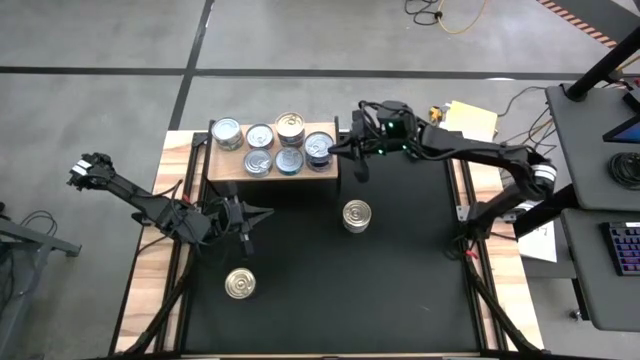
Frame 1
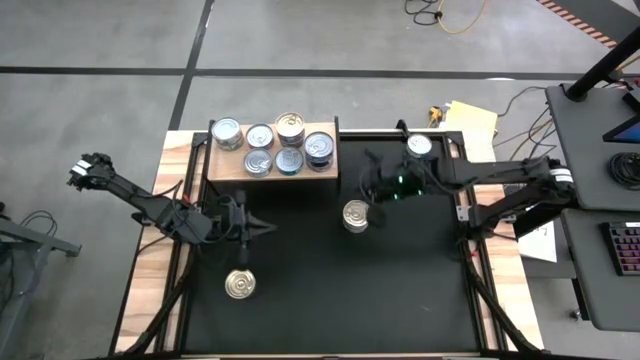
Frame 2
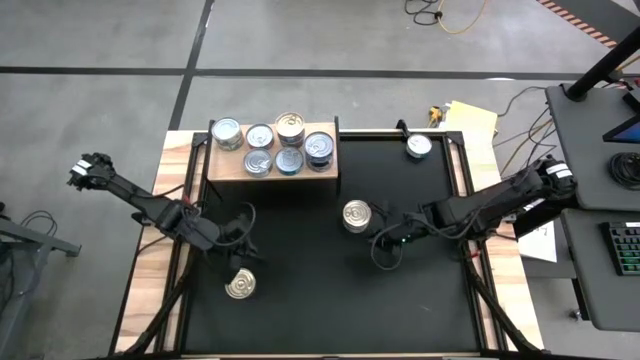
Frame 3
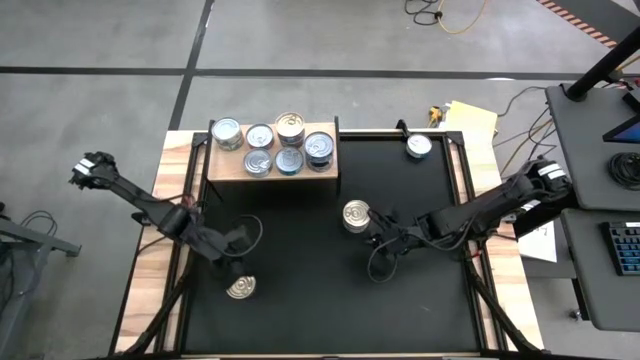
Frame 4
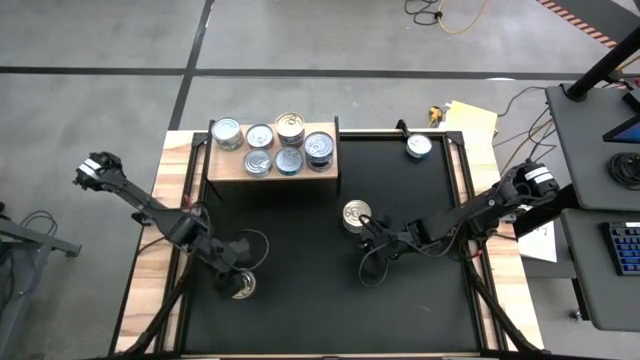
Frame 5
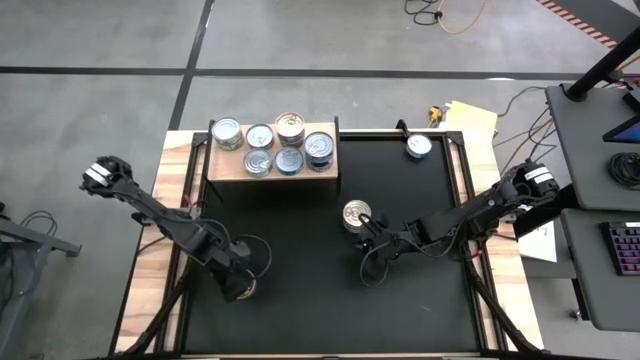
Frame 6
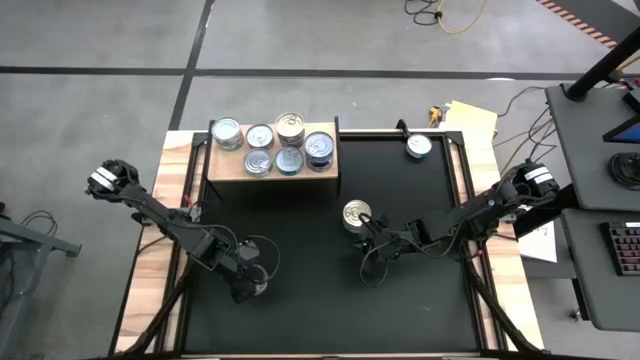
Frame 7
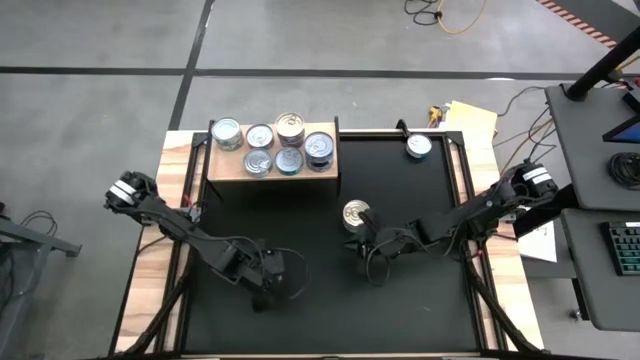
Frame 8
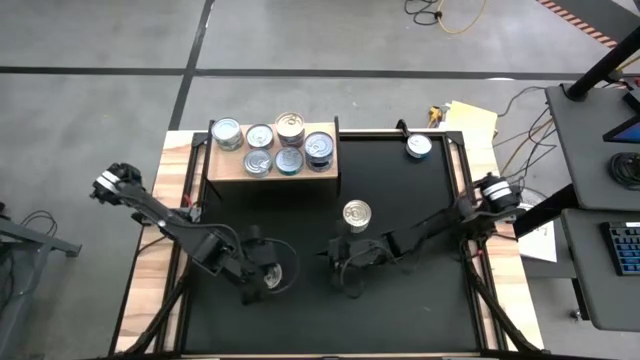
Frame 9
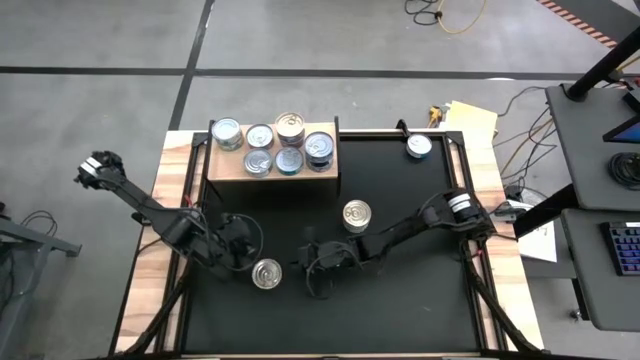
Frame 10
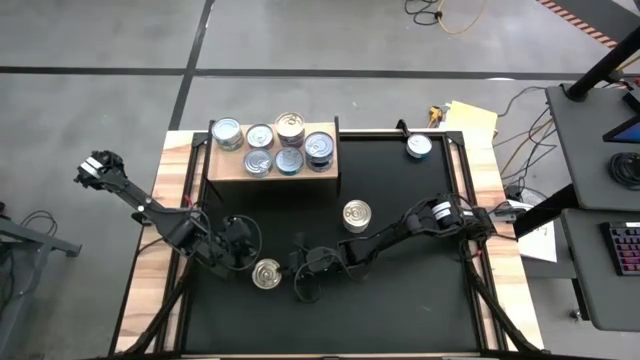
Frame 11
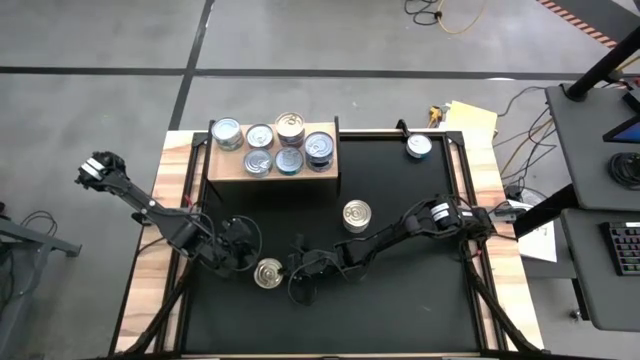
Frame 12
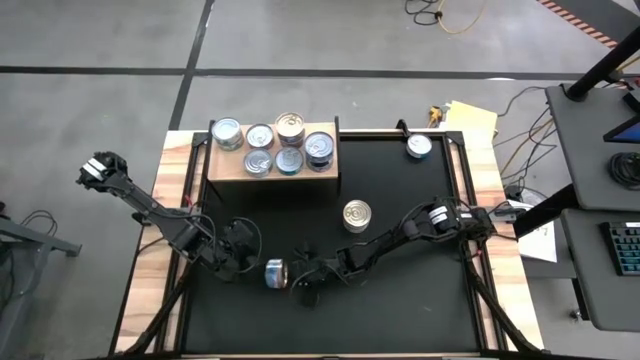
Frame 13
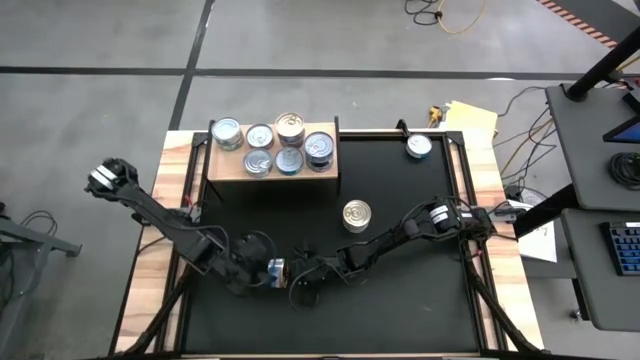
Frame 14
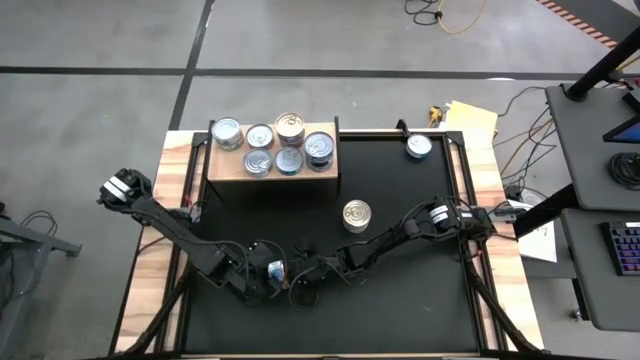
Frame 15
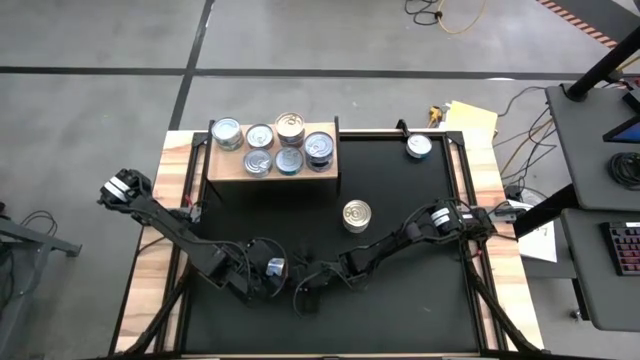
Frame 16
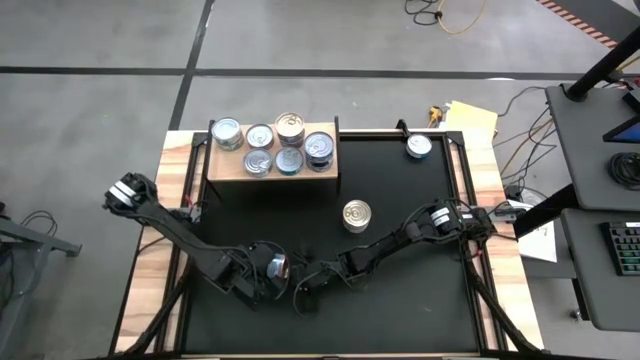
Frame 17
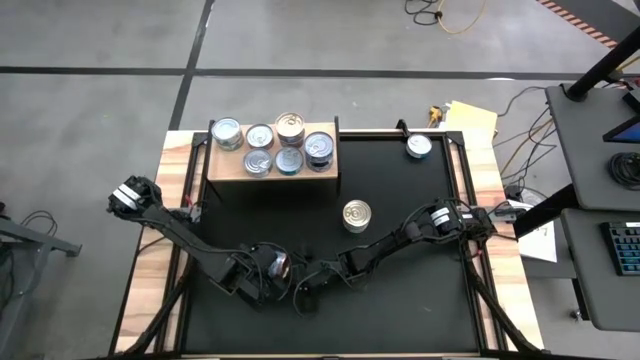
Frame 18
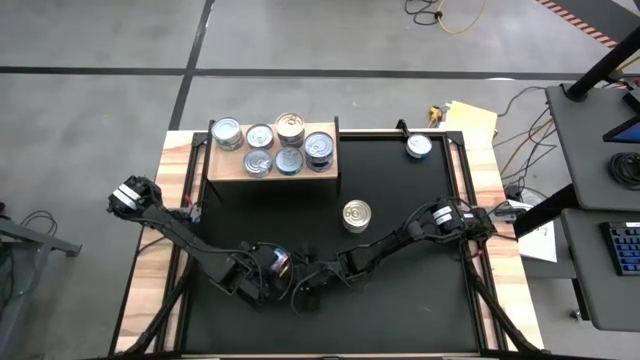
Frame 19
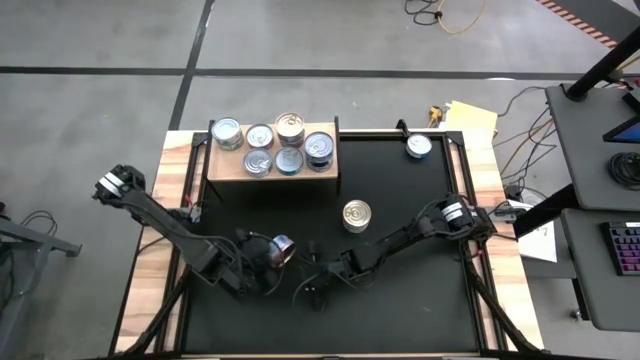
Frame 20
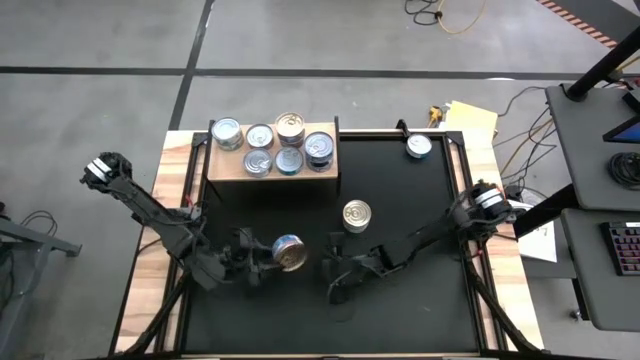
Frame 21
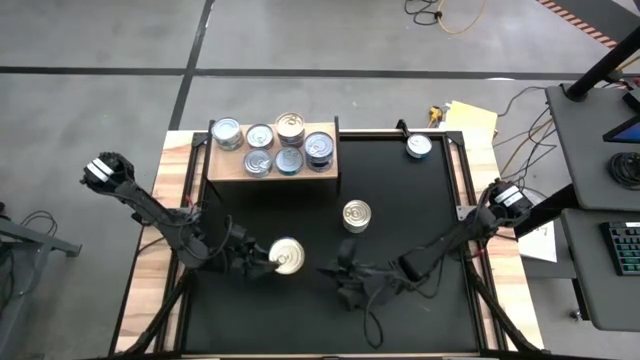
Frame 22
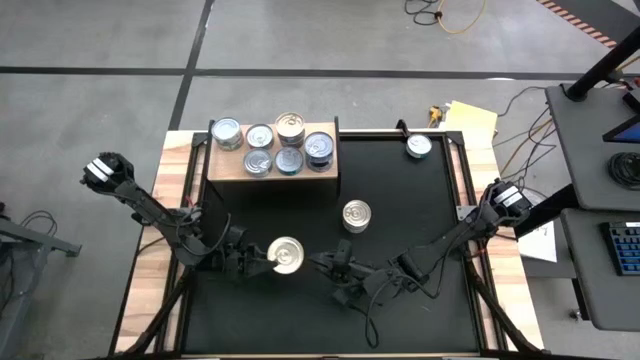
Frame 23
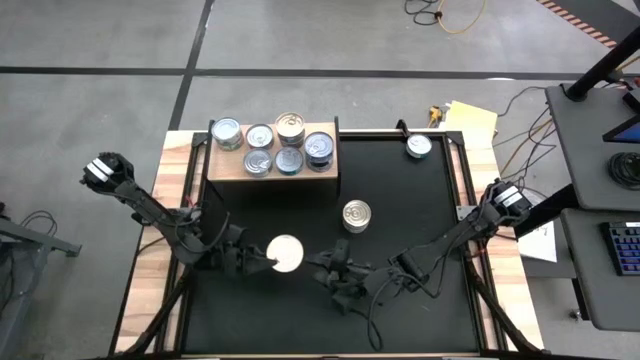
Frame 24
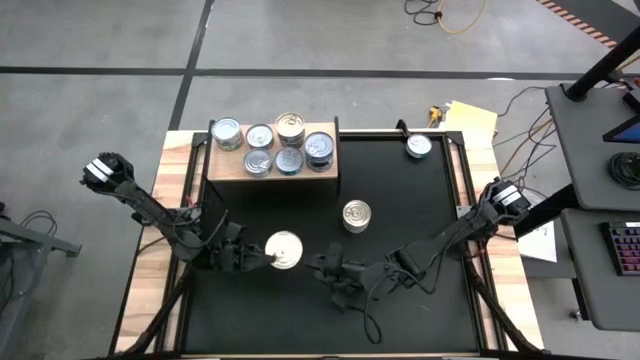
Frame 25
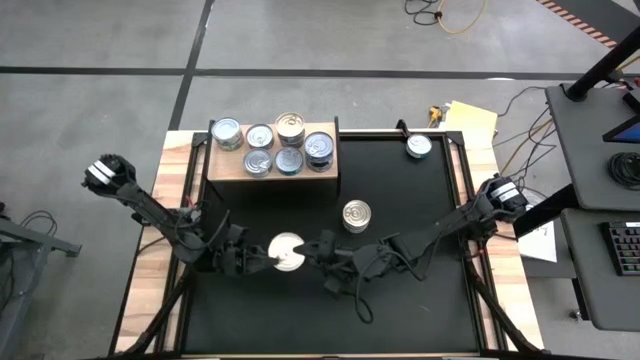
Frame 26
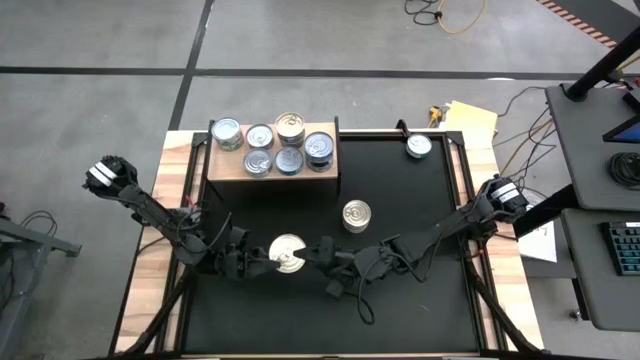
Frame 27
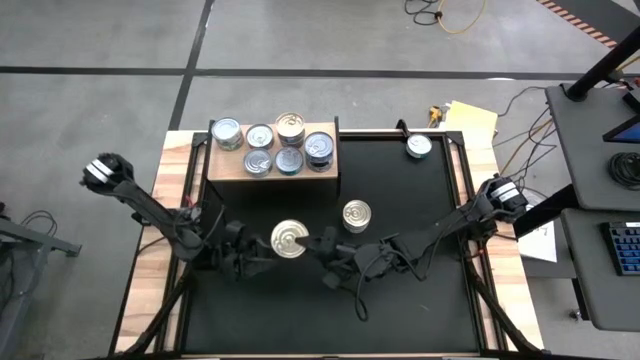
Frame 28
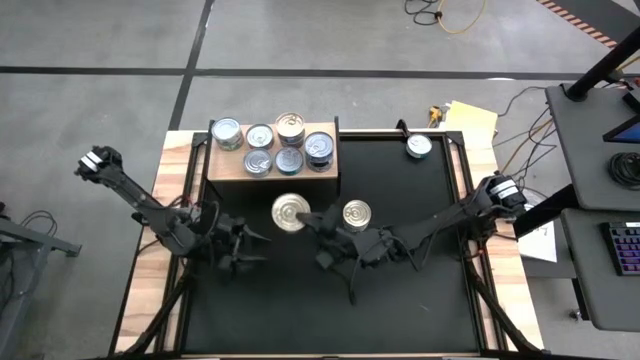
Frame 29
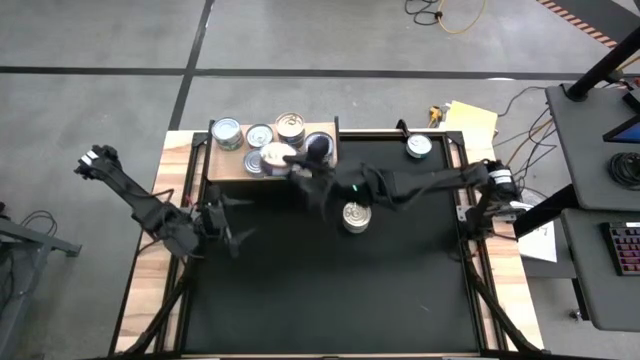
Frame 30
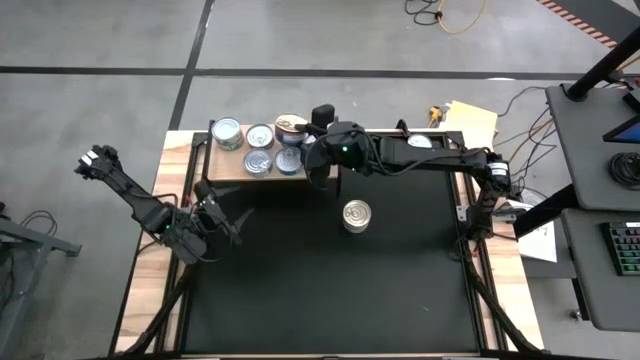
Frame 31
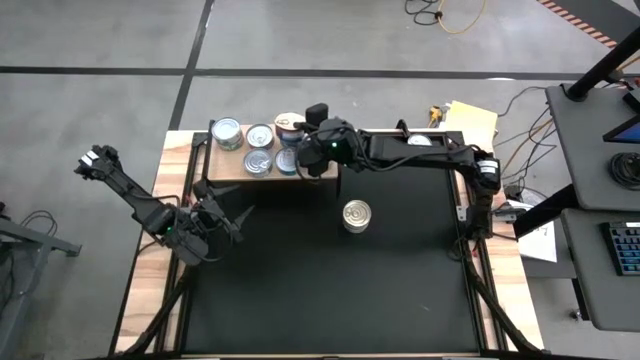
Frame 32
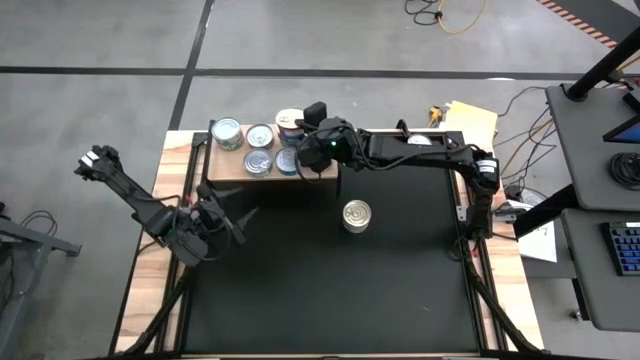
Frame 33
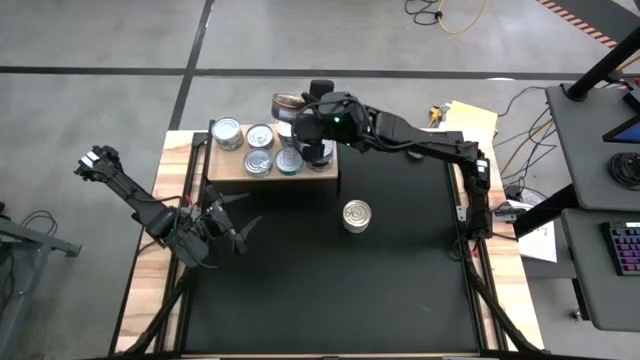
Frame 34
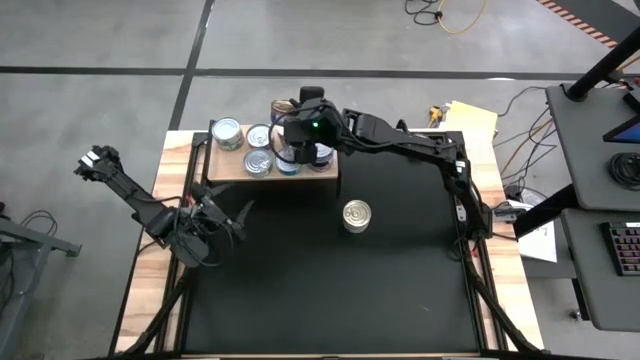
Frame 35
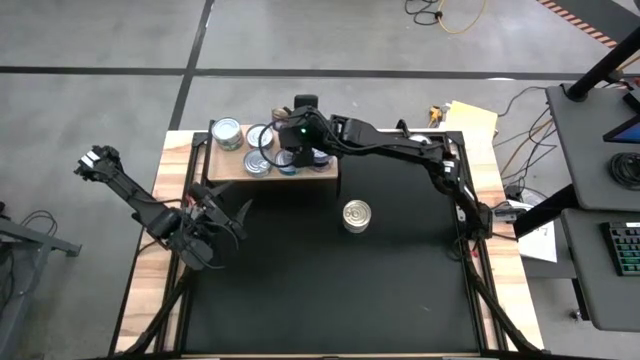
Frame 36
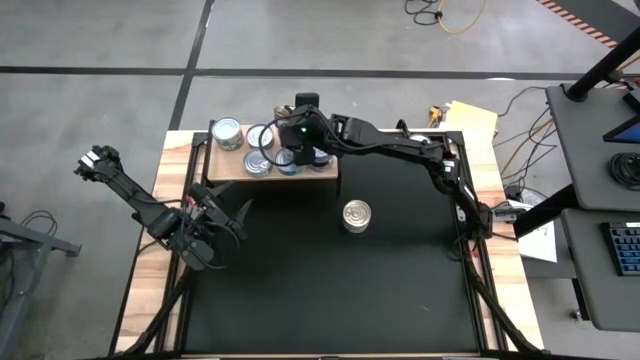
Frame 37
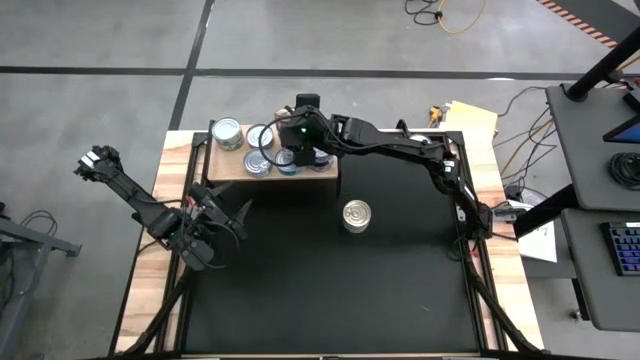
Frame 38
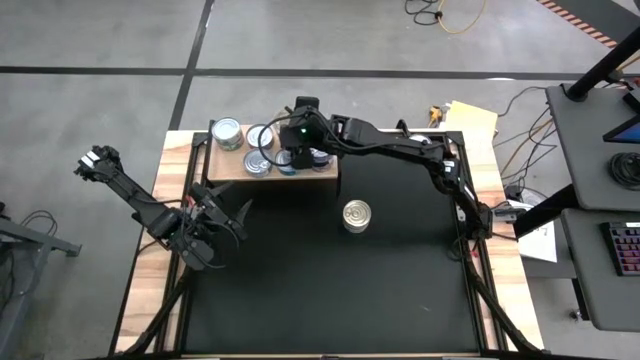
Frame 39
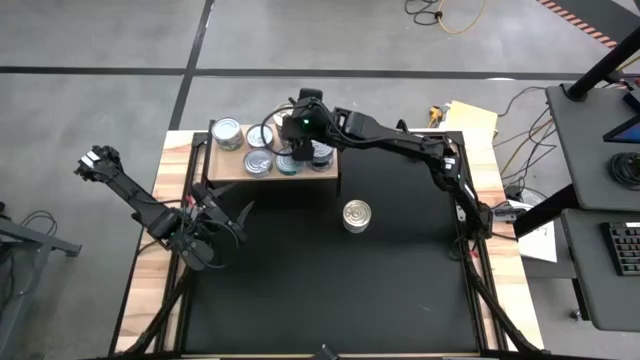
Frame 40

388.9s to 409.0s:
Task: Stack canned seafood by type on shelf
Stack the blue/pink tuna can on top of the other blue/pink tuna can on the shelf

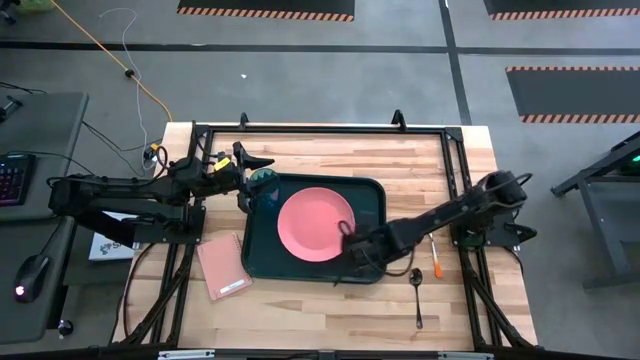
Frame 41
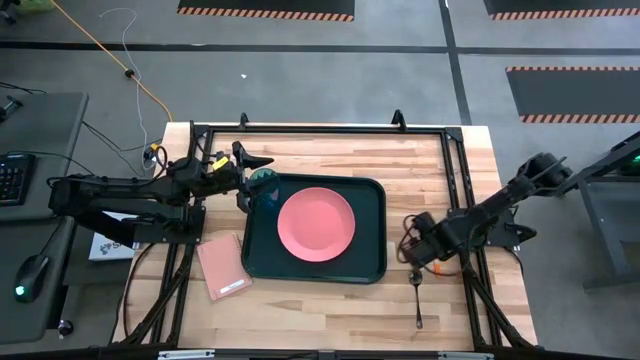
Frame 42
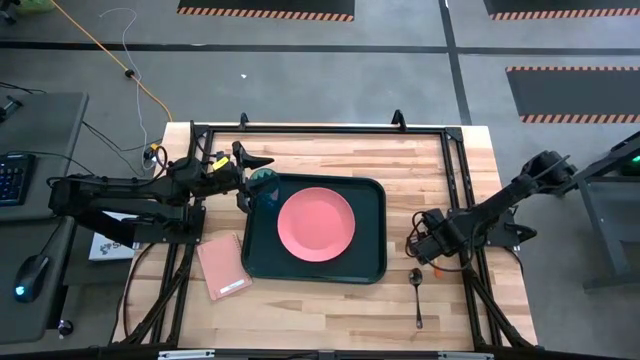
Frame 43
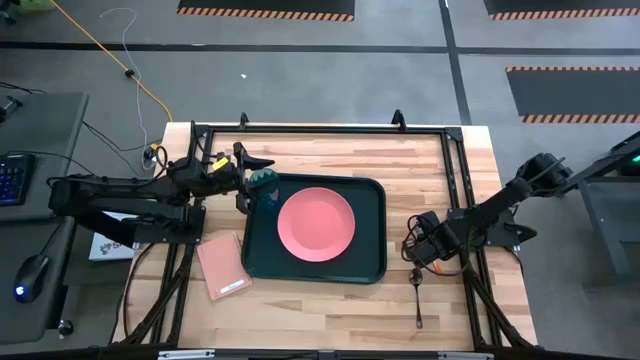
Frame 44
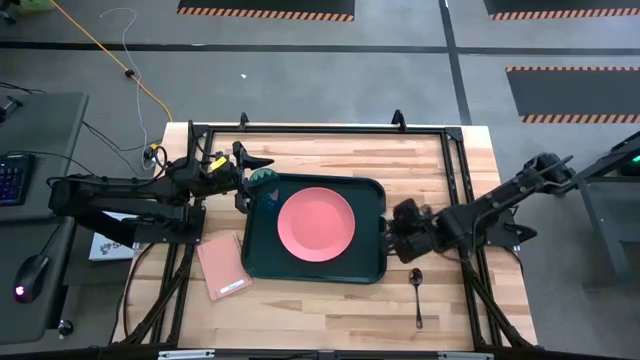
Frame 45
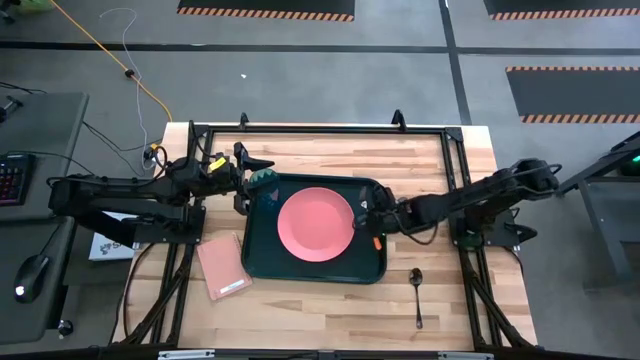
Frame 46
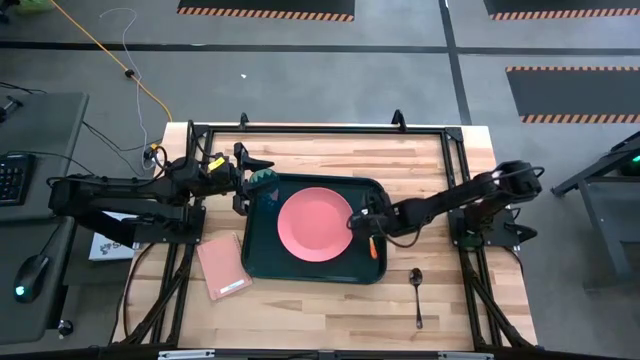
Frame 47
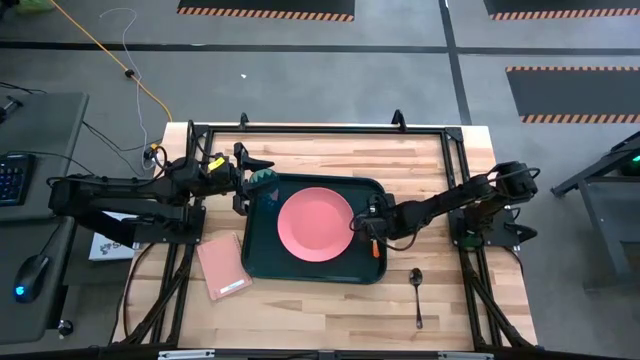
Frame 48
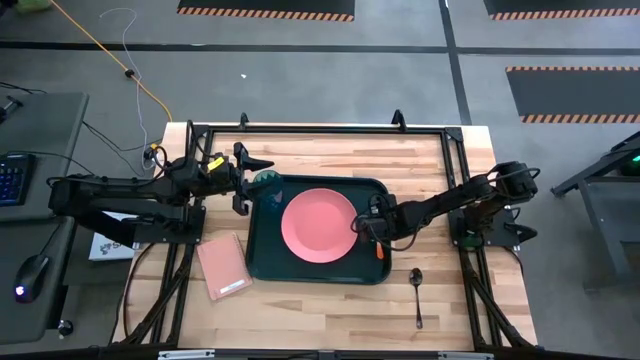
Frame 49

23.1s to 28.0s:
Task: Pick and place plate/cup/fork/spoon on tray
Put the orange fork on the black tray to the right side of the pink plate
